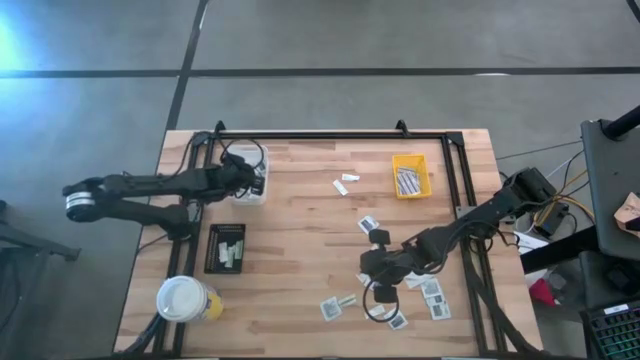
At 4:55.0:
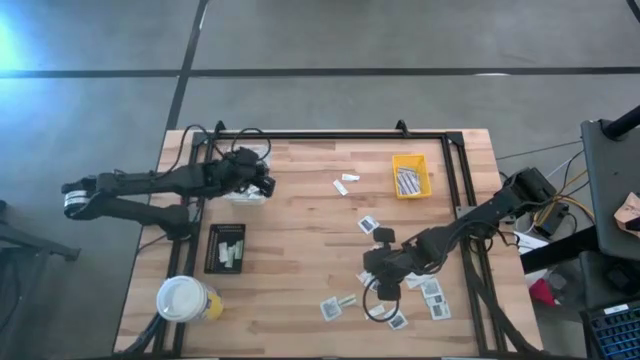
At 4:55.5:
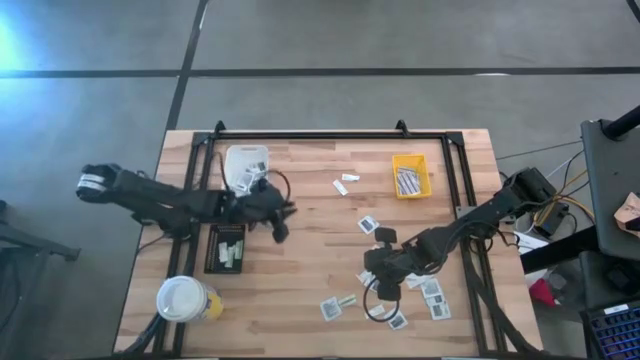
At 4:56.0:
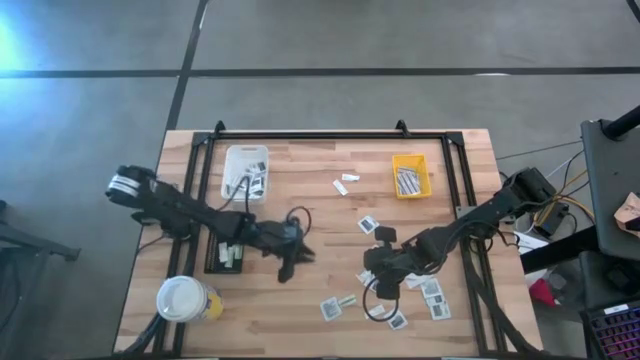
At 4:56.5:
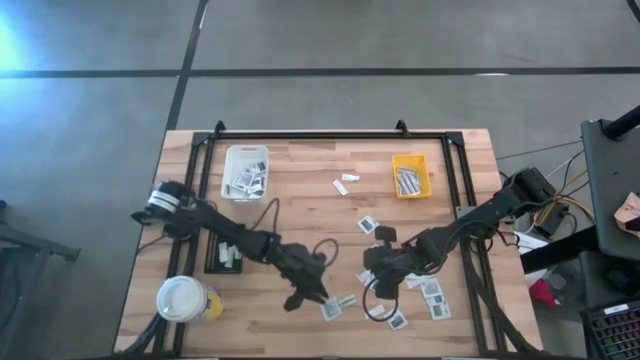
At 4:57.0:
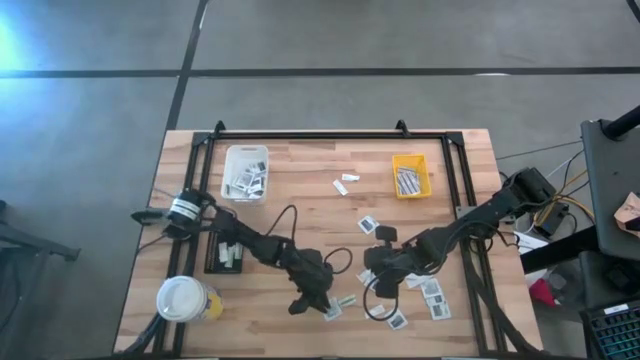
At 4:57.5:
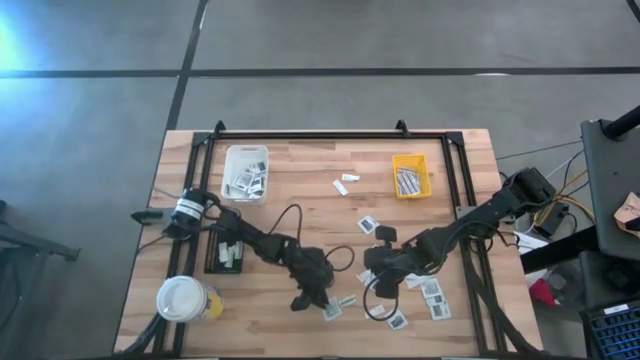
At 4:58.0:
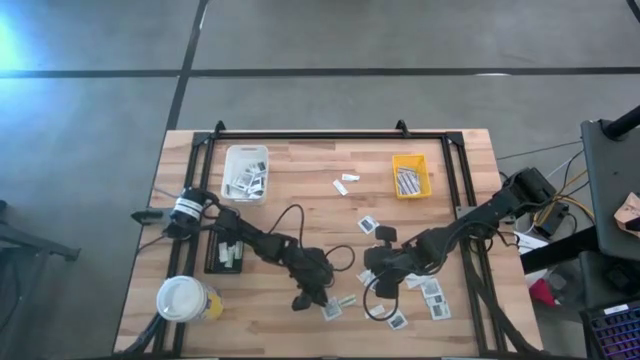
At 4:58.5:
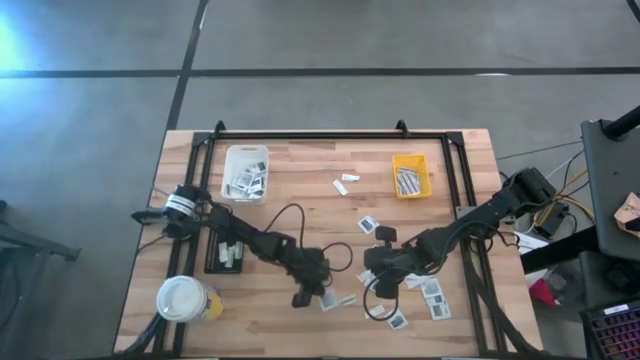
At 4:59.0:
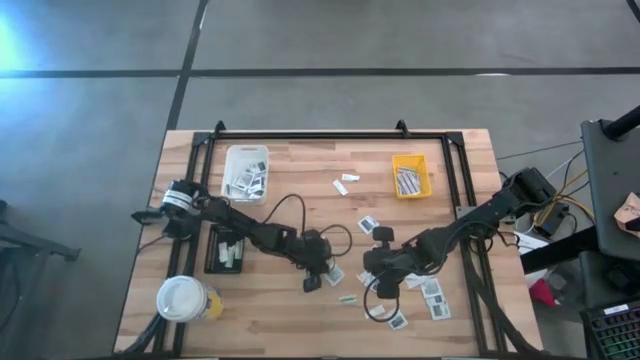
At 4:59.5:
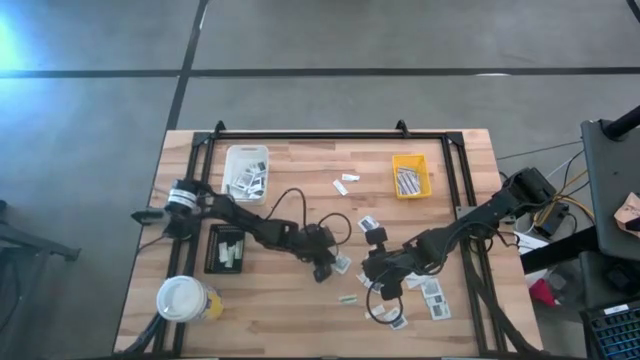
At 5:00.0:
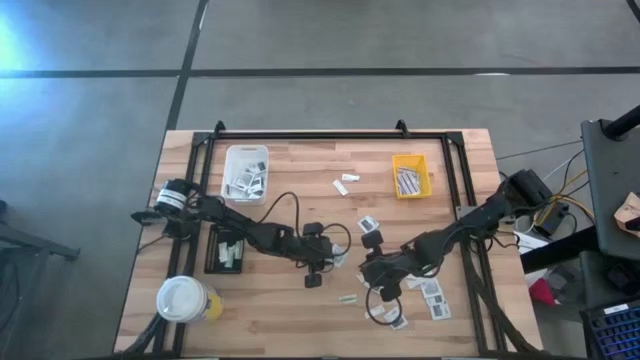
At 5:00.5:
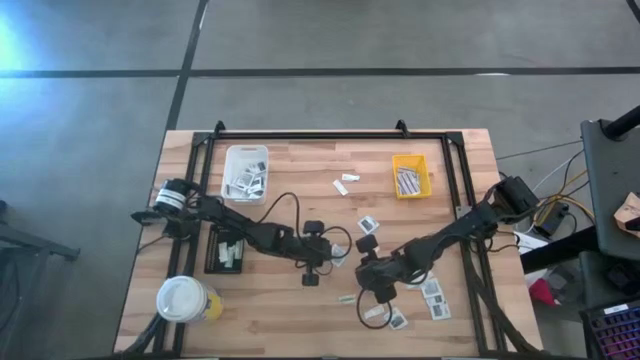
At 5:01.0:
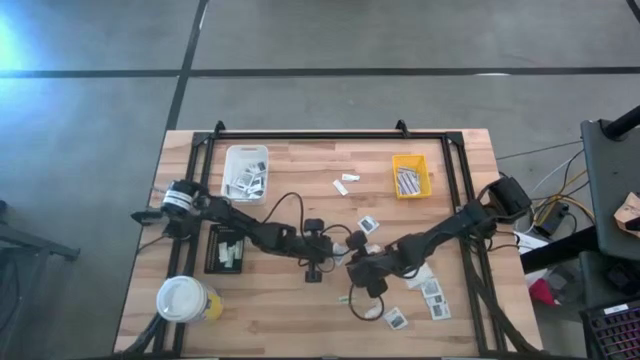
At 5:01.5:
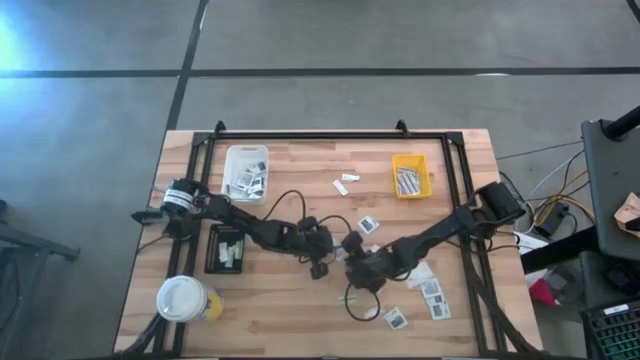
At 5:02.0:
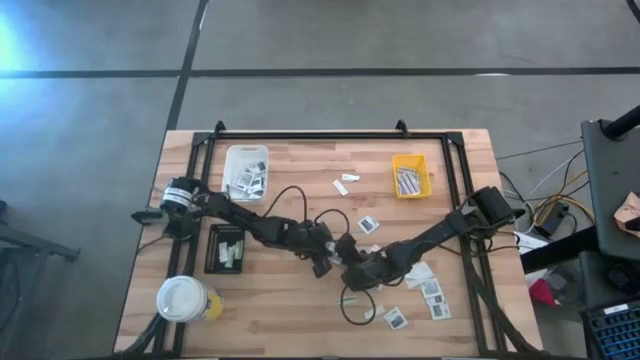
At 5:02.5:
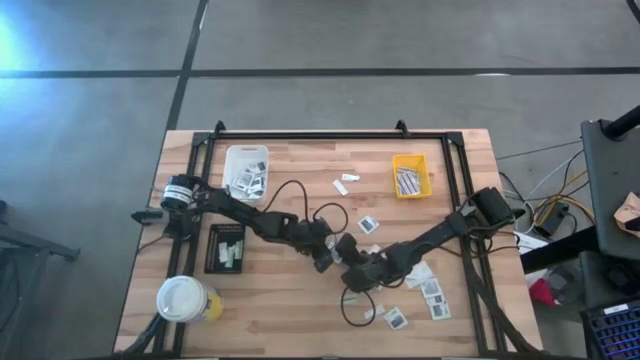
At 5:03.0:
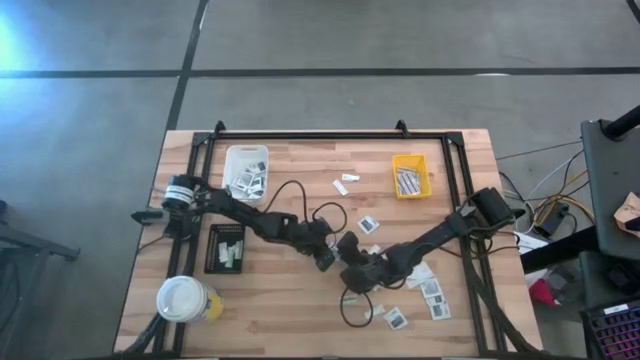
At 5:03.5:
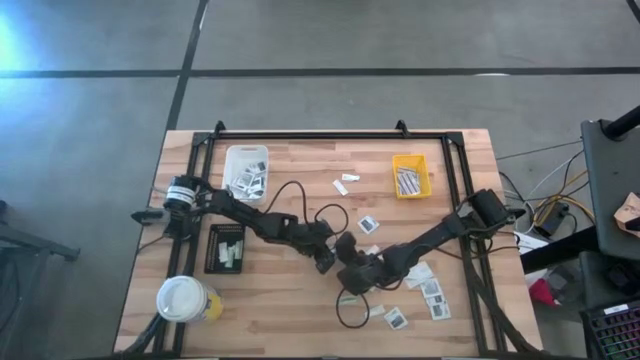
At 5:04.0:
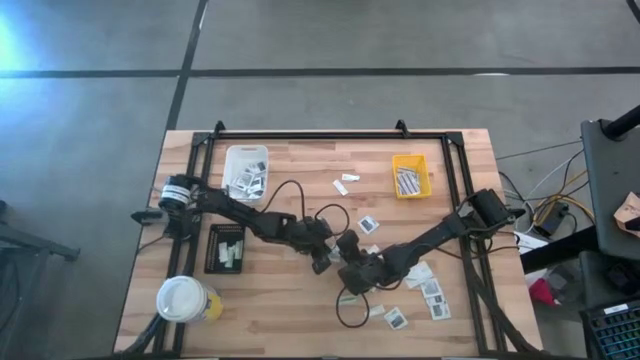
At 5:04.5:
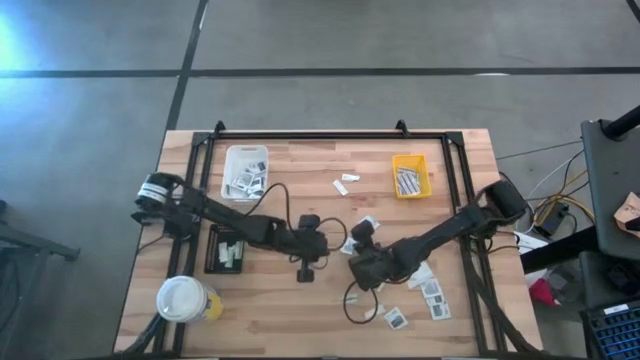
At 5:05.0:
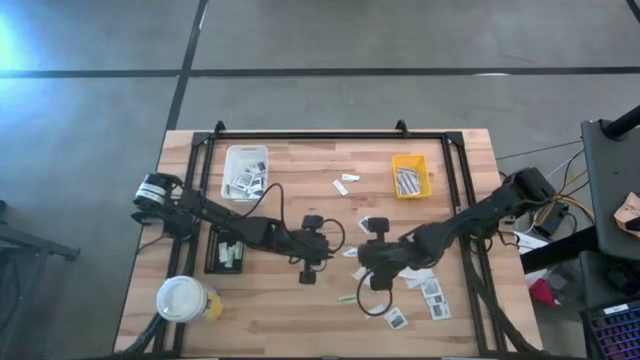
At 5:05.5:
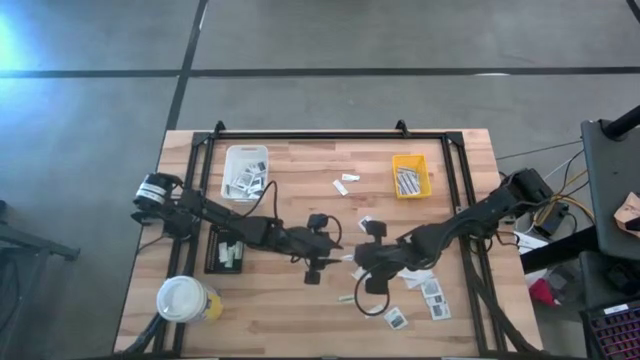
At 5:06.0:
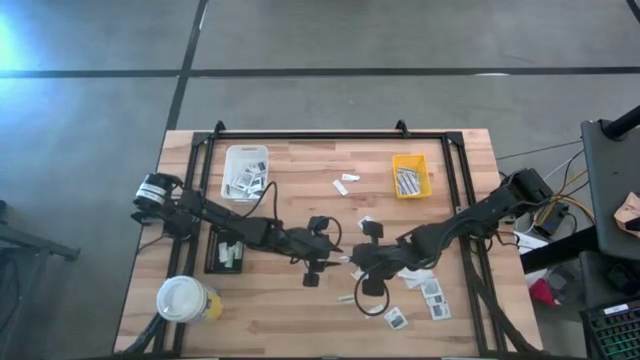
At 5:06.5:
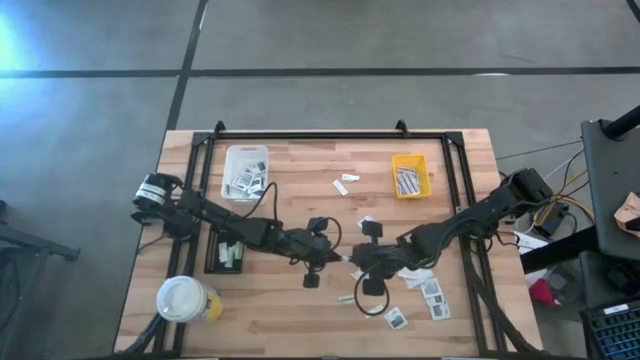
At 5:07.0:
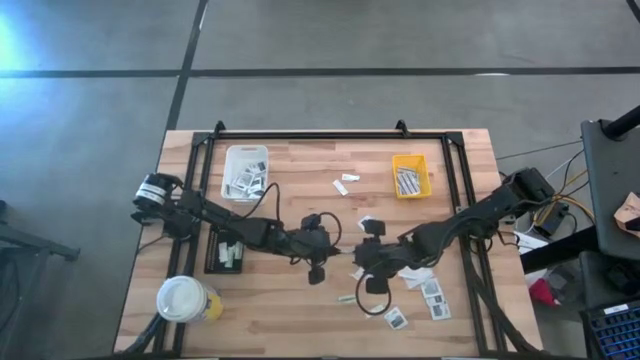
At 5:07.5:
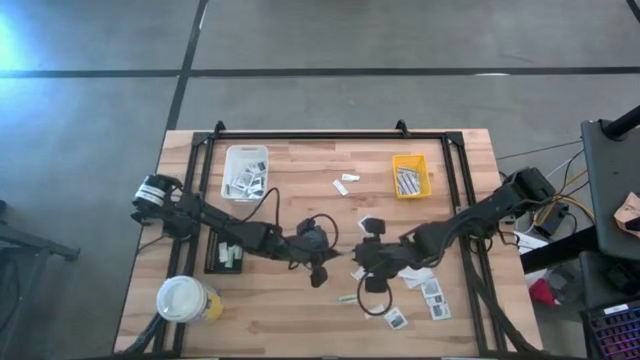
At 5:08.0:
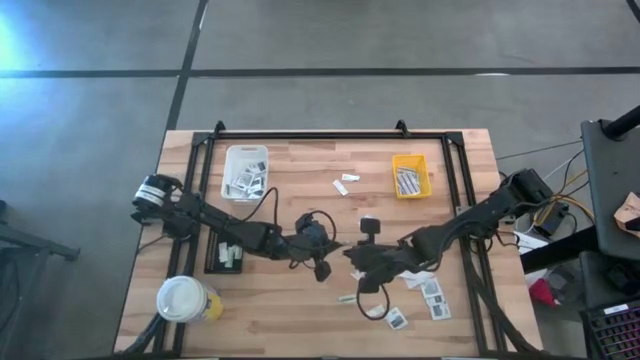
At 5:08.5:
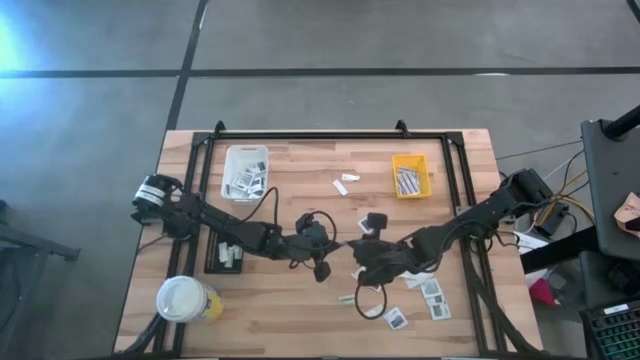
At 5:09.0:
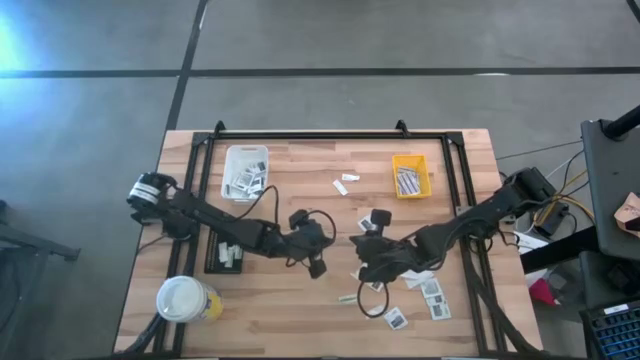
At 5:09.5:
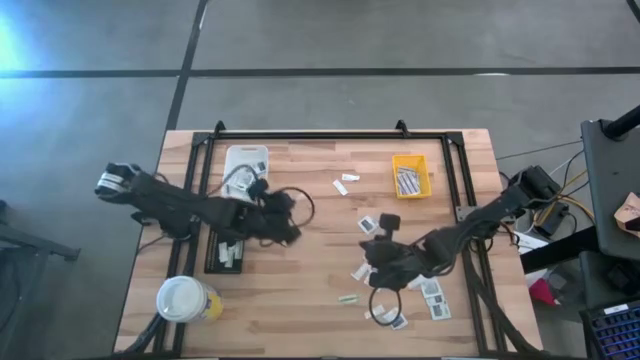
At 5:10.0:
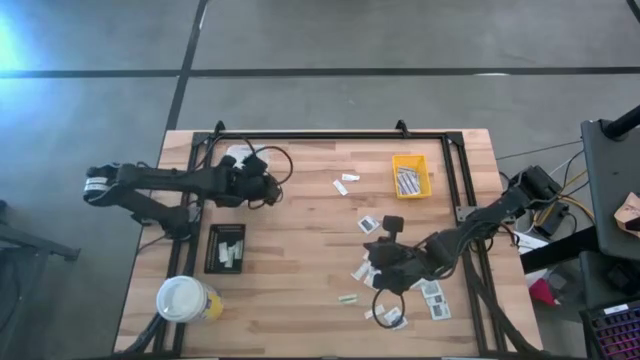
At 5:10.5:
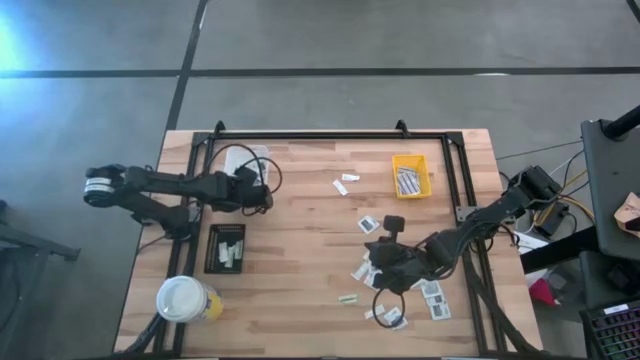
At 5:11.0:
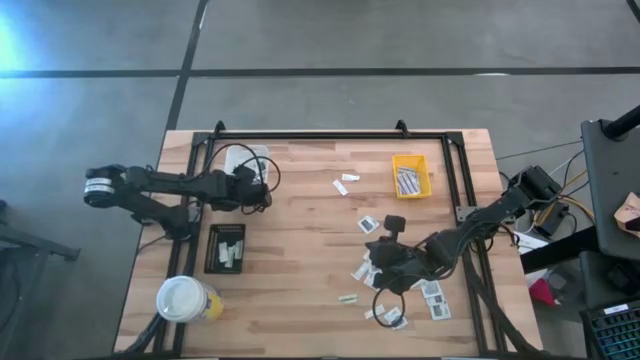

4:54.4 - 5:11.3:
Task: Pick & Place First Aid Supplies
Put the gray towelette pack into the white bin

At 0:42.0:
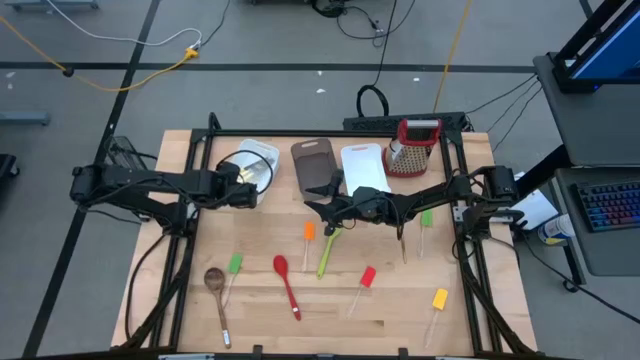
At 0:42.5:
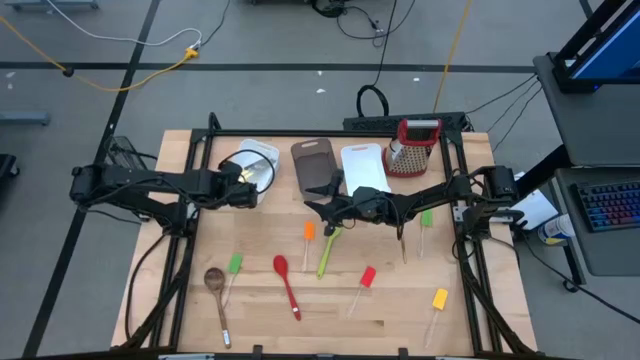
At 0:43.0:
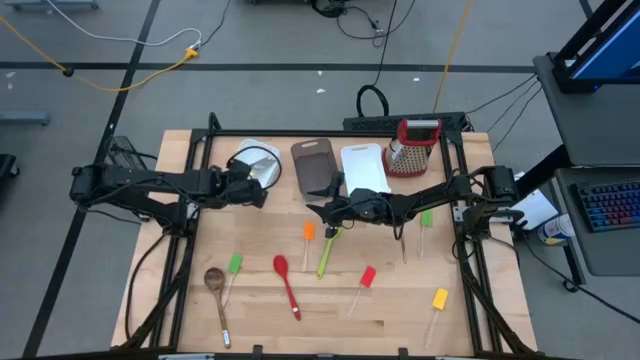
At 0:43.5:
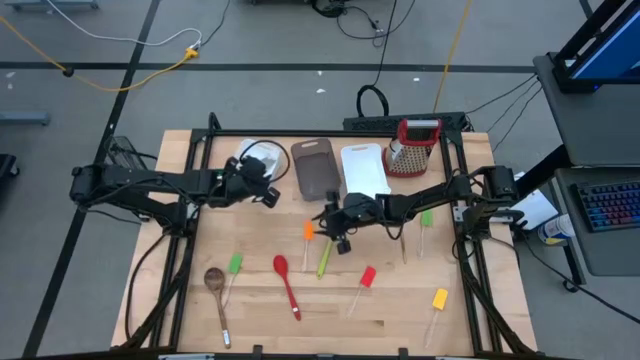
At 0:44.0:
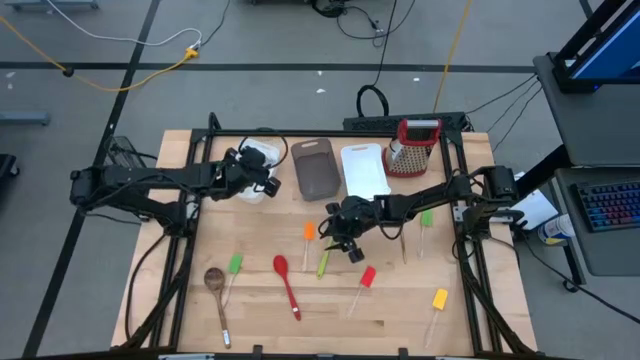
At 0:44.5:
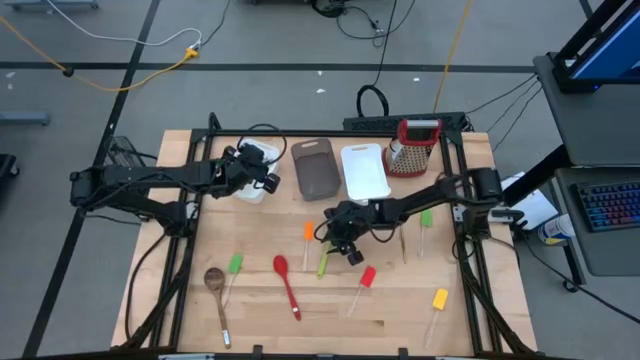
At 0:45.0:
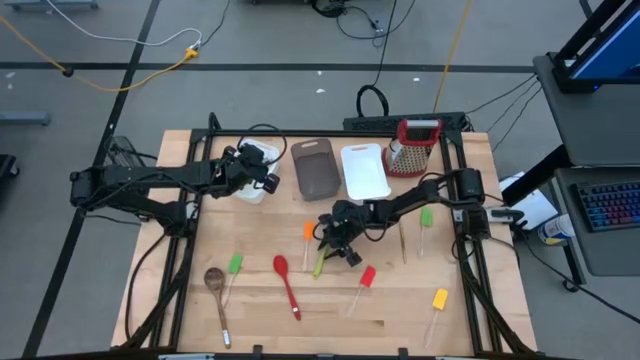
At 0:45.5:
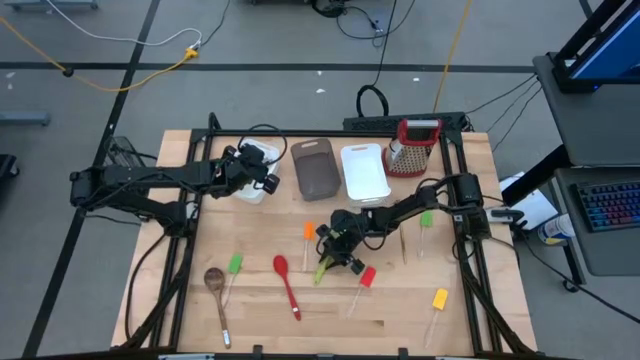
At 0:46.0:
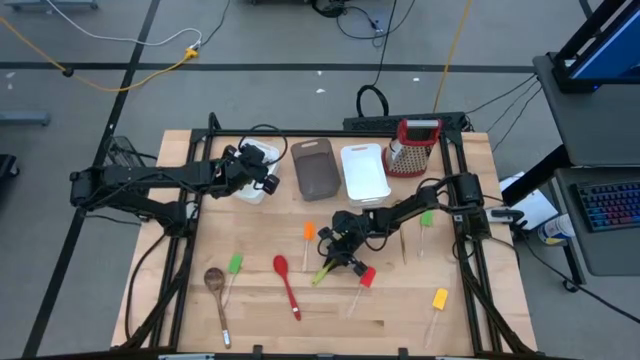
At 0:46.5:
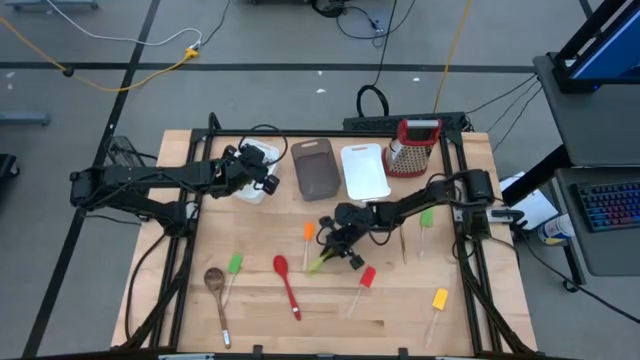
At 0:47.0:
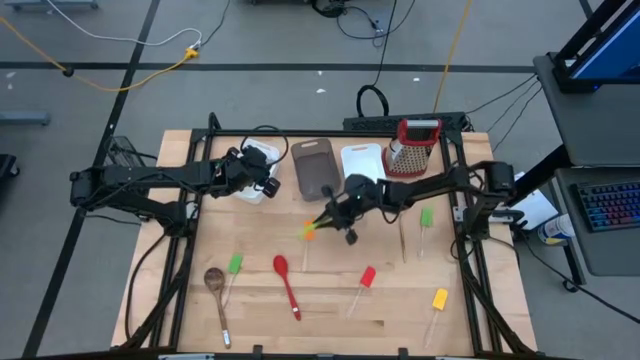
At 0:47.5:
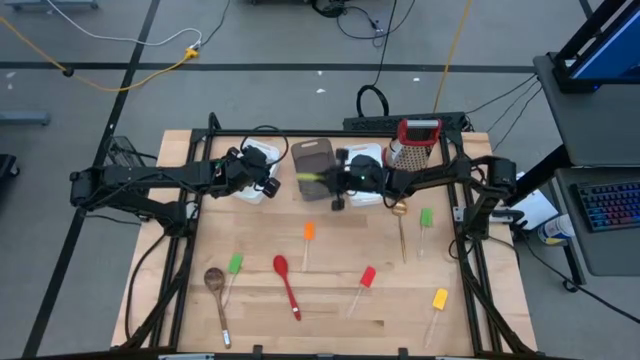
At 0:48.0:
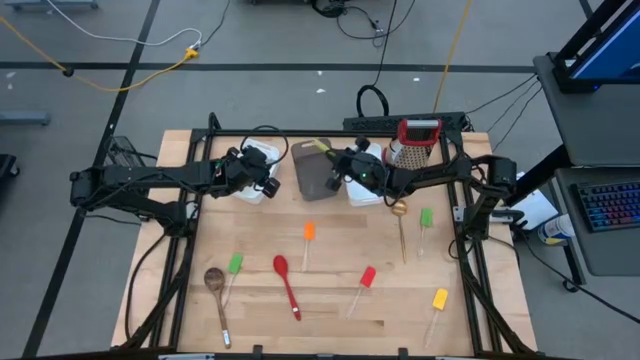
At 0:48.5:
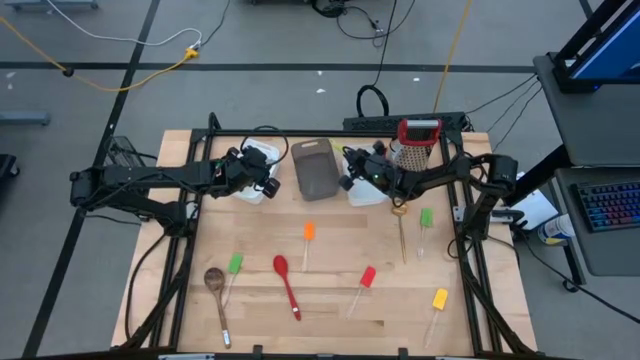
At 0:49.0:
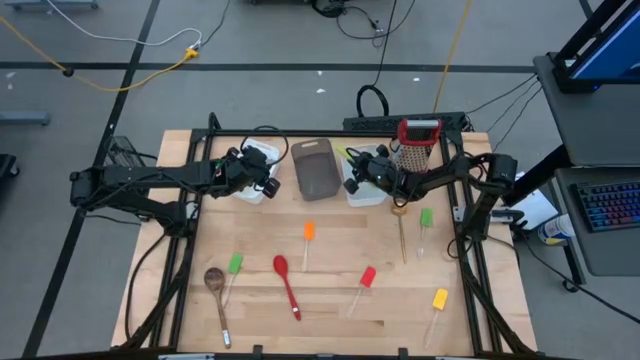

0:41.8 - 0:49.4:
Task: Pick & Place Kitchen Items
Put the light green slotted spoon into the right white bin
